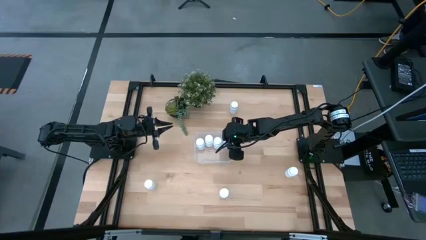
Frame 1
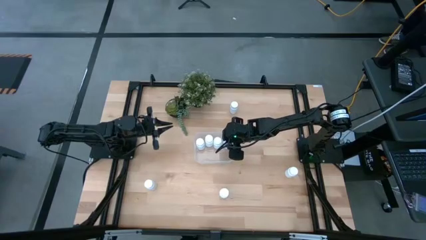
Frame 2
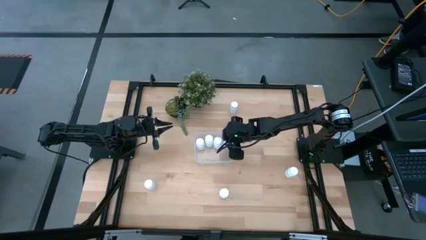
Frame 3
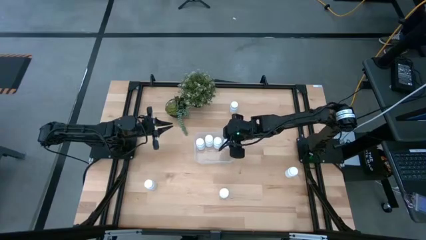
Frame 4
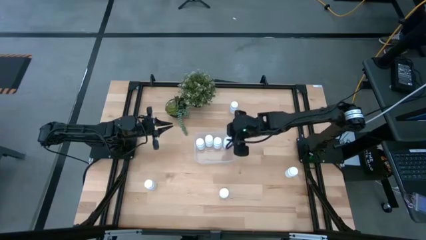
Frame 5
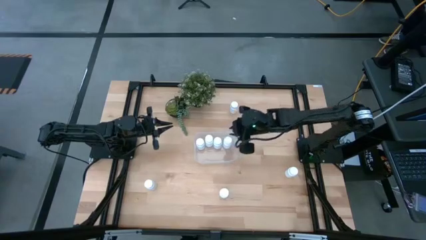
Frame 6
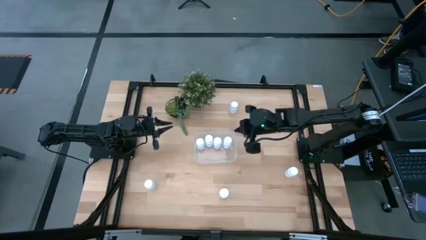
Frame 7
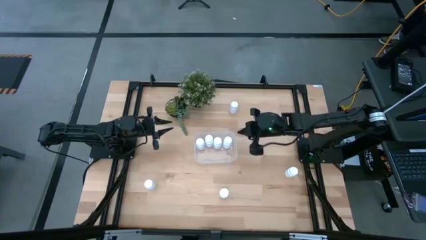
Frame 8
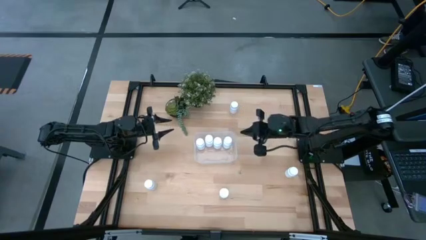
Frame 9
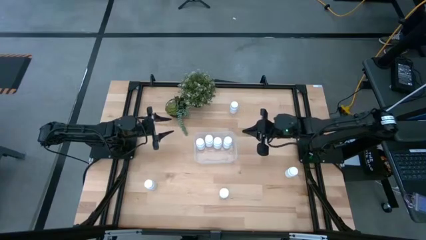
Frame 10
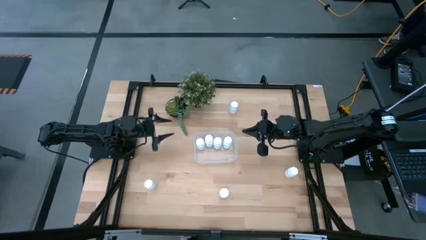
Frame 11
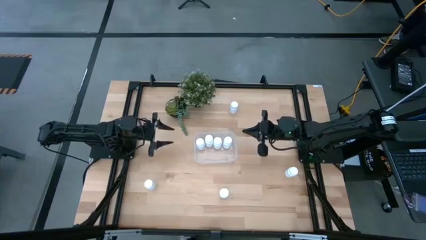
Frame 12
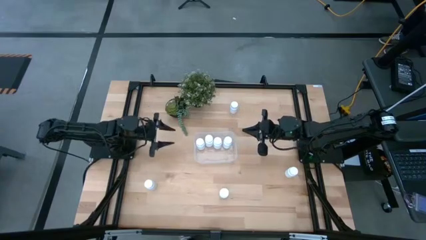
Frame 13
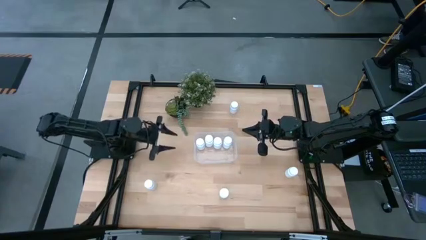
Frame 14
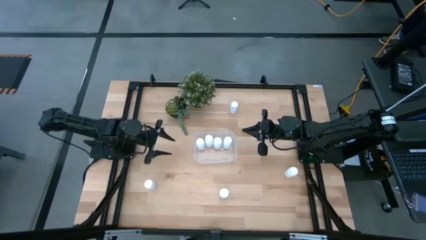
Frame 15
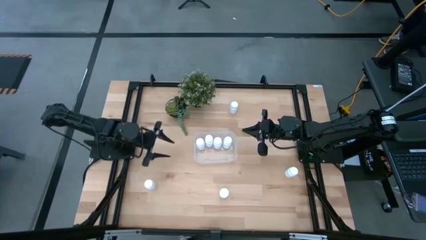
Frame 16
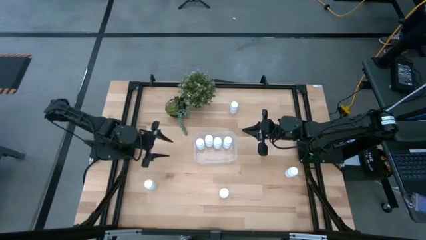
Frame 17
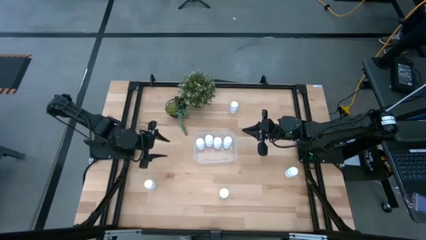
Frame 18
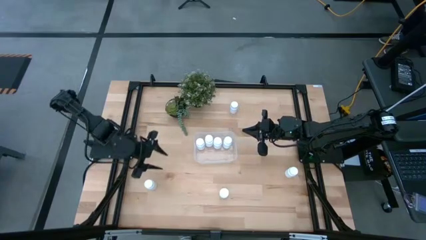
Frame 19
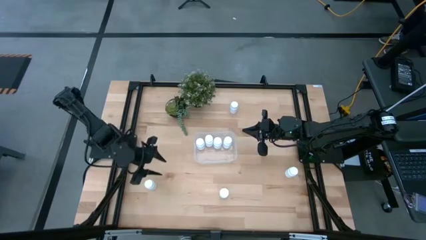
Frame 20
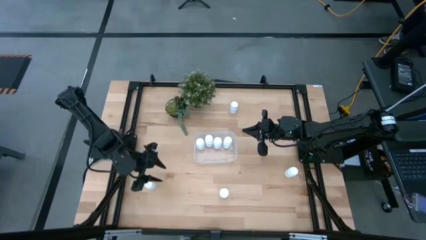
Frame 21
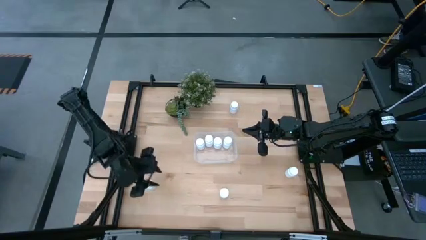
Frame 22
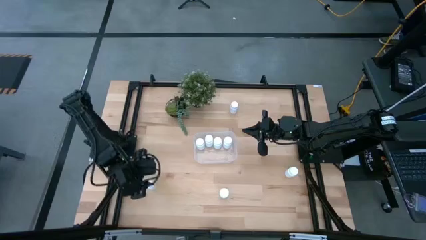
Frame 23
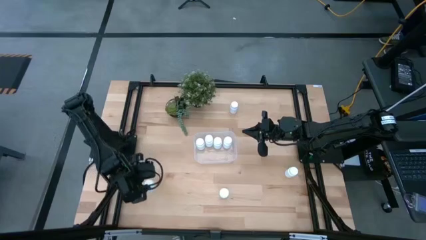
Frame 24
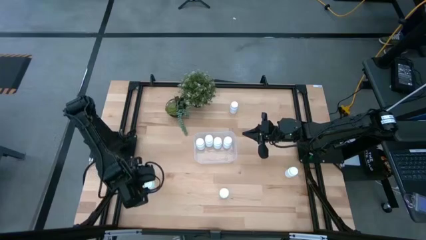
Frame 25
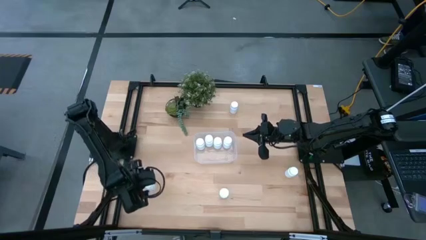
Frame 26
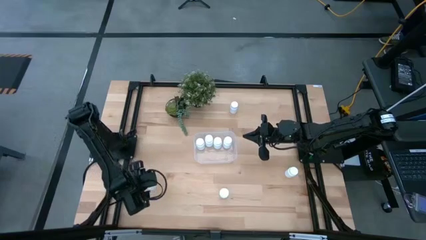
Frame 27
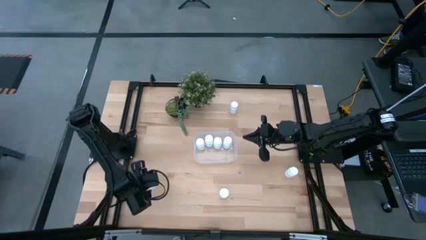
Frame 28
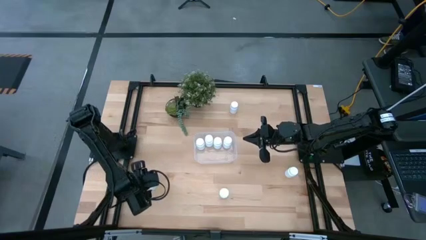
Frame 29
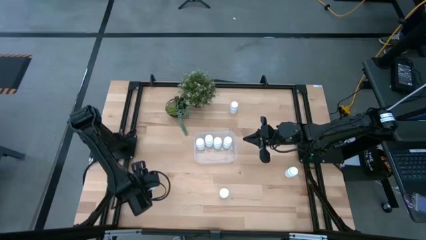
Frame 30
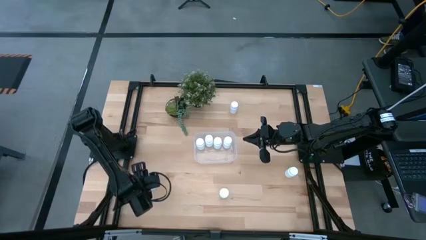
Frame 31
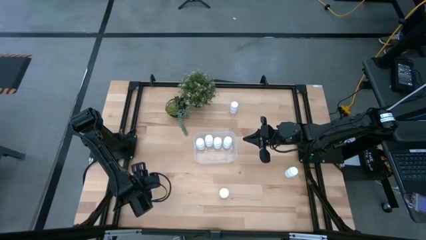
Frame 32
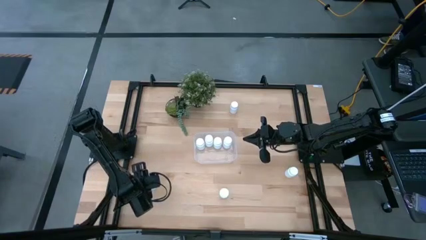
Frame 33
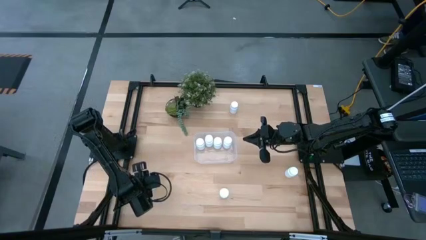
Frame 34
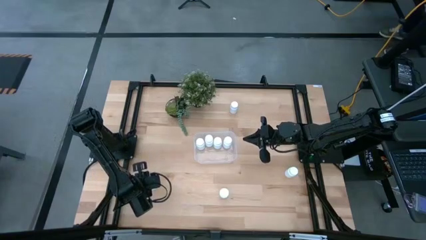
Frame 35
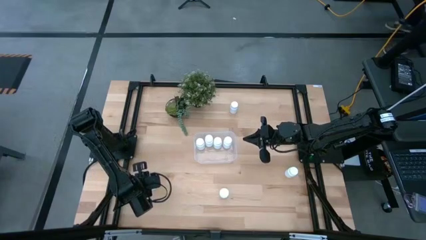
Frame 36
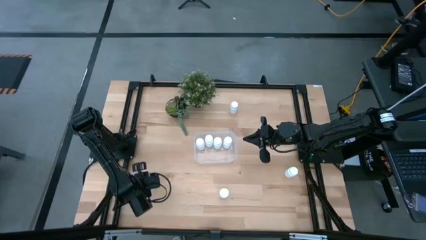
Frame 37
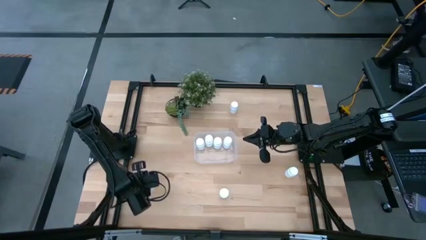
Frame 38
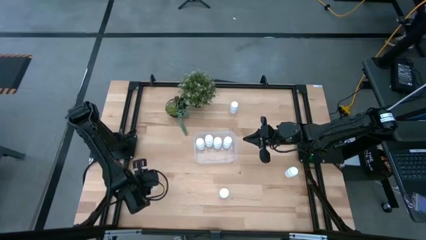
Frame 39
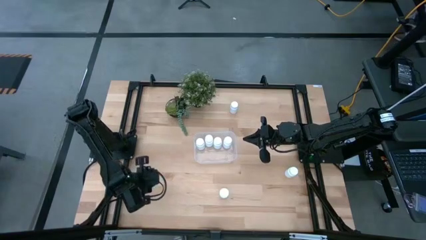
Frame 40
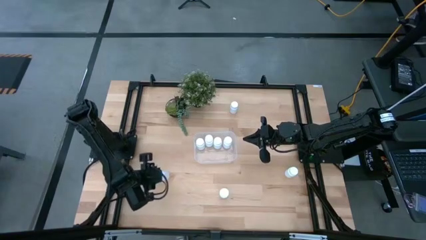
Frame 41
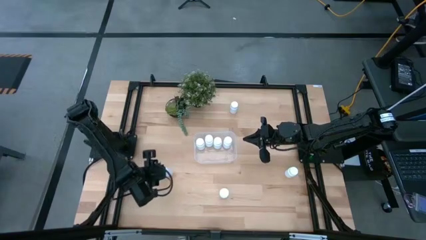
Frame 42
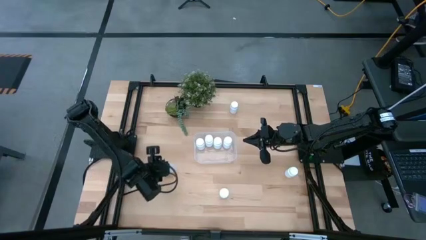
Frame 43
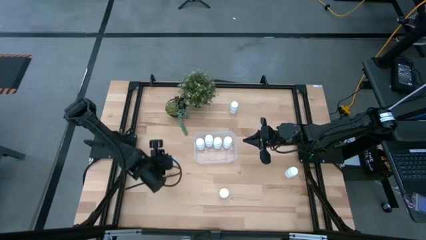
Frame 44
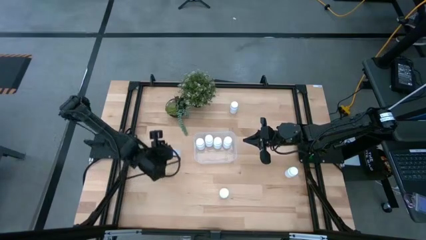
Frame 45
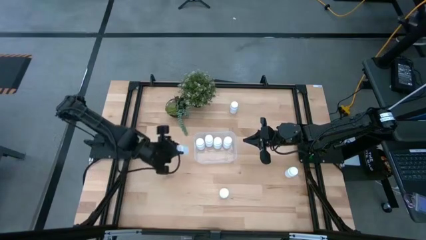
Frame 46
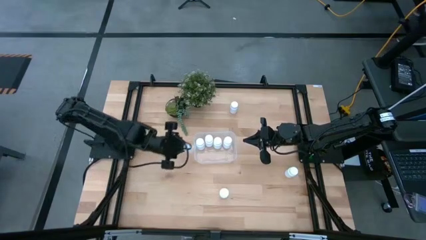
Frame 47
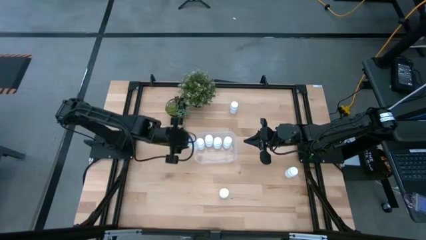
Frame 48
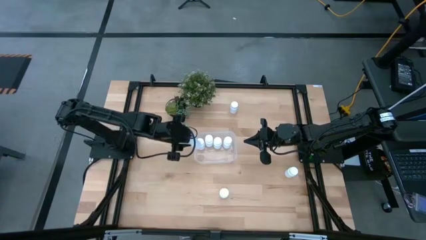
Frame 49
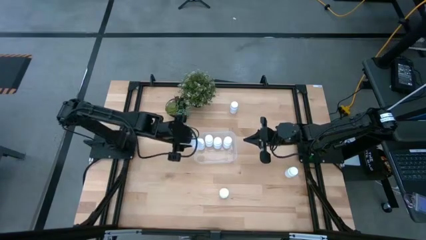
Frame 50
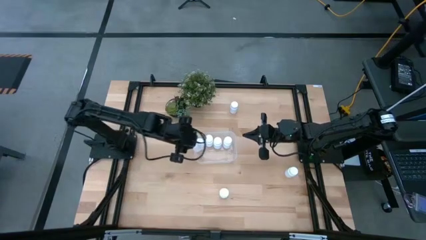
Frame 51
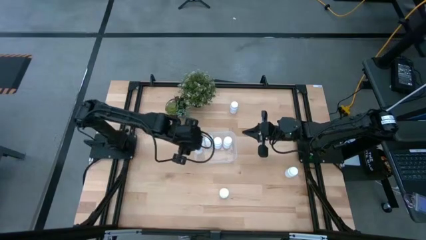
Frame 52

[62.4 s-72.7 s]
Task: Pick and place pill bottles into a basket
Put the pill bottle into the bin

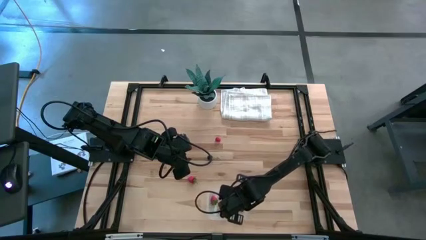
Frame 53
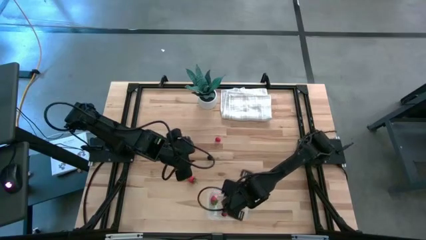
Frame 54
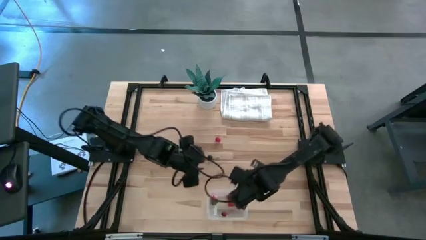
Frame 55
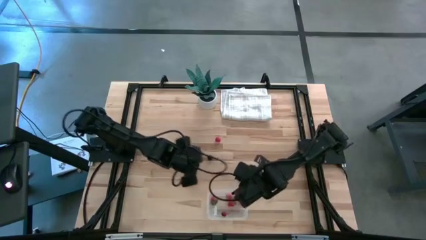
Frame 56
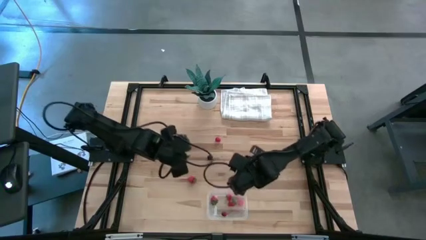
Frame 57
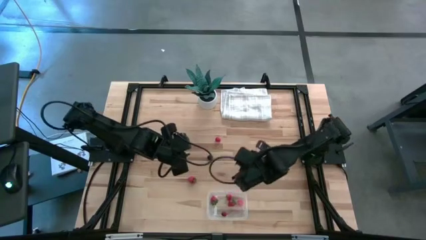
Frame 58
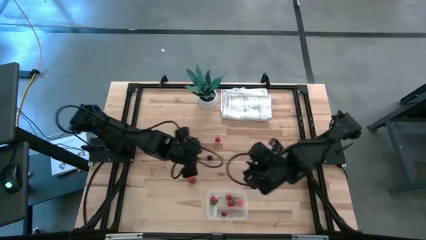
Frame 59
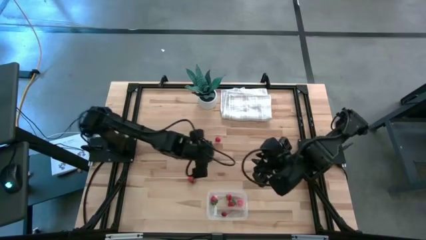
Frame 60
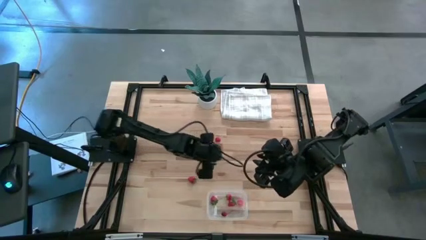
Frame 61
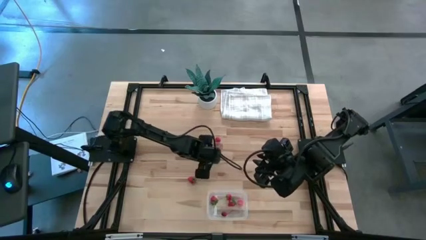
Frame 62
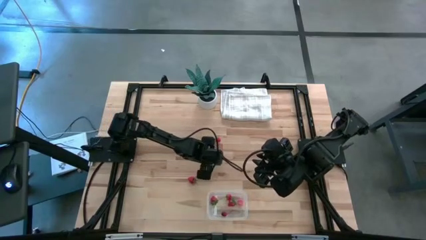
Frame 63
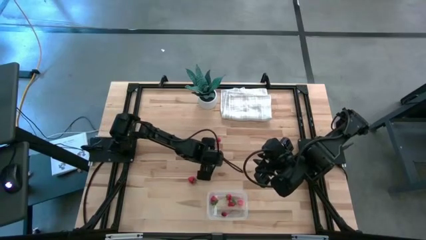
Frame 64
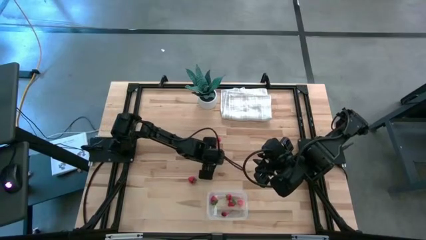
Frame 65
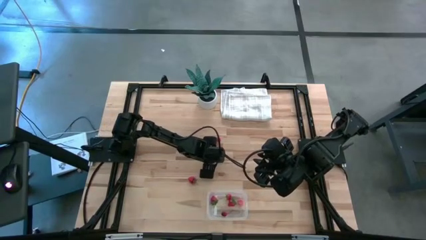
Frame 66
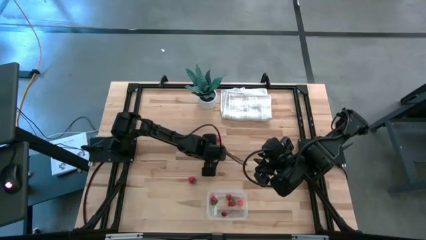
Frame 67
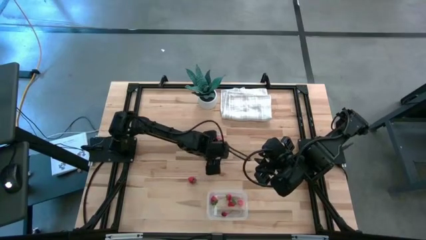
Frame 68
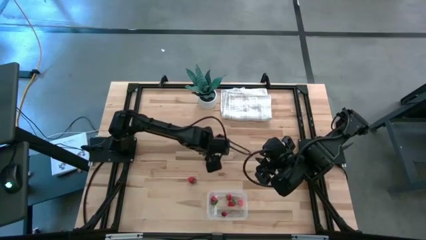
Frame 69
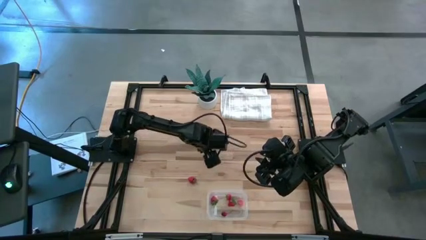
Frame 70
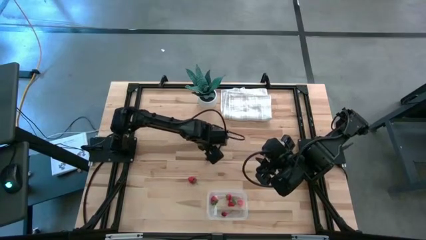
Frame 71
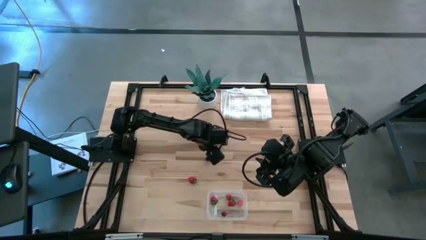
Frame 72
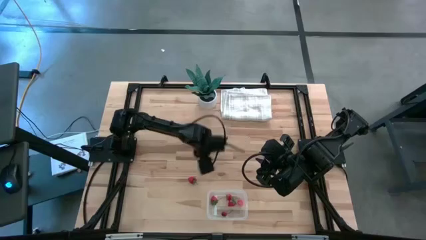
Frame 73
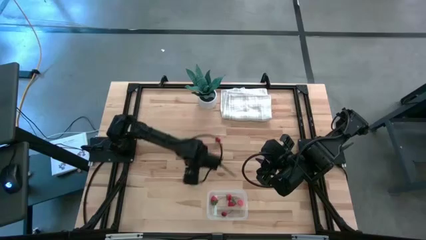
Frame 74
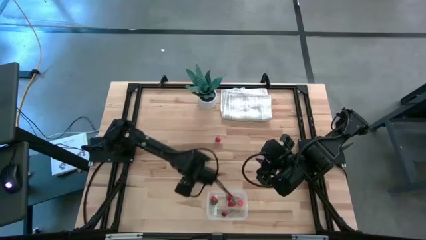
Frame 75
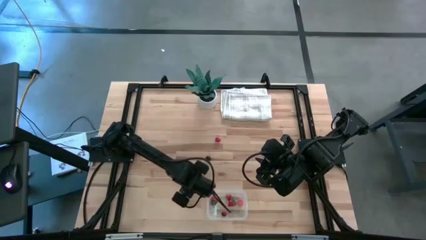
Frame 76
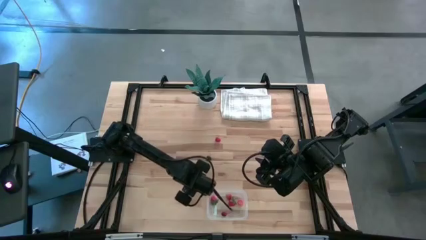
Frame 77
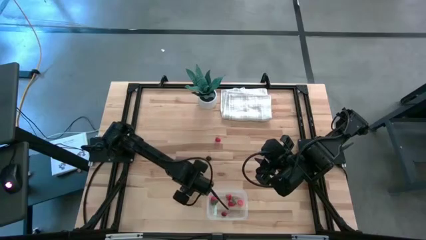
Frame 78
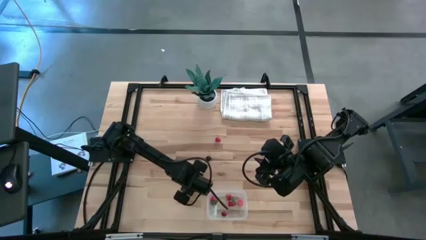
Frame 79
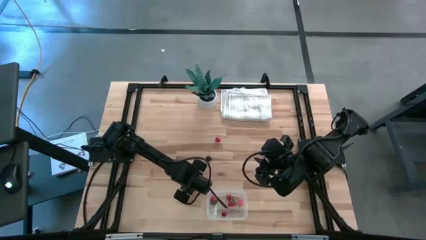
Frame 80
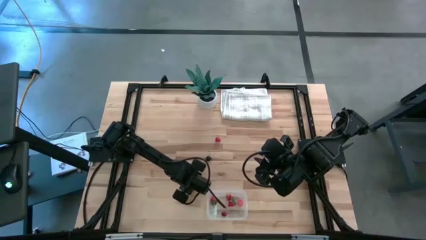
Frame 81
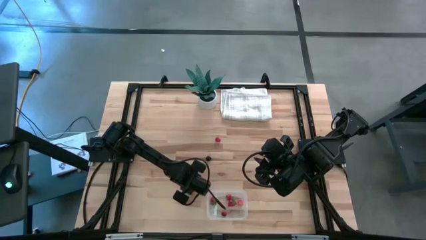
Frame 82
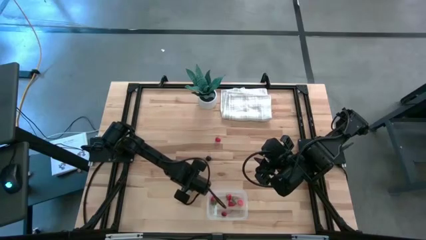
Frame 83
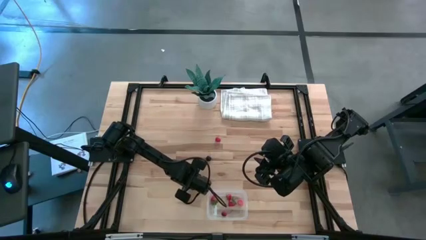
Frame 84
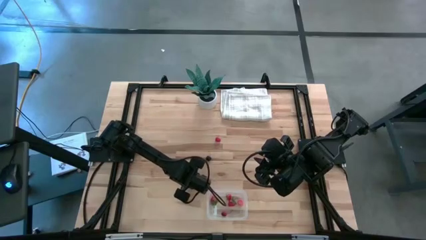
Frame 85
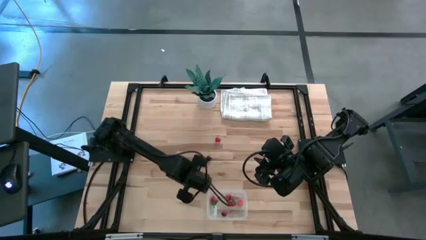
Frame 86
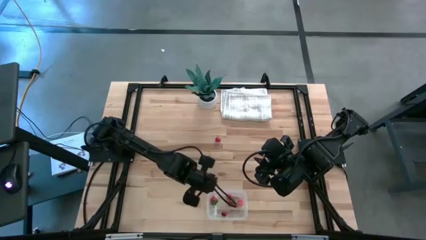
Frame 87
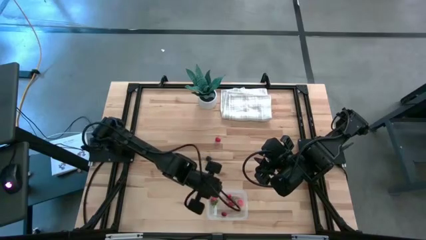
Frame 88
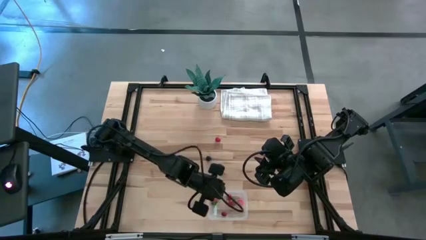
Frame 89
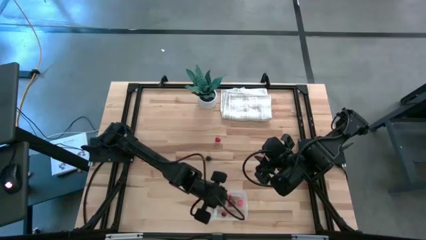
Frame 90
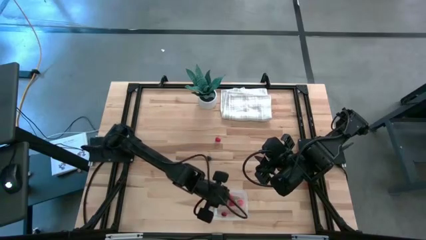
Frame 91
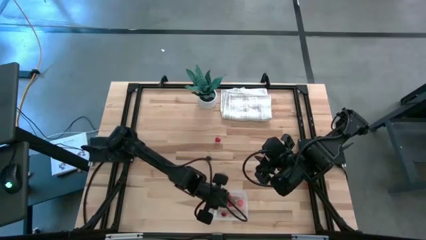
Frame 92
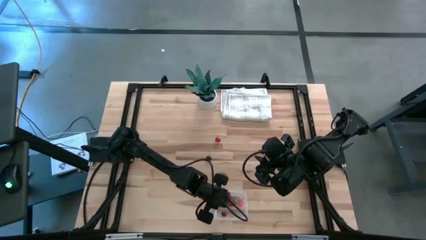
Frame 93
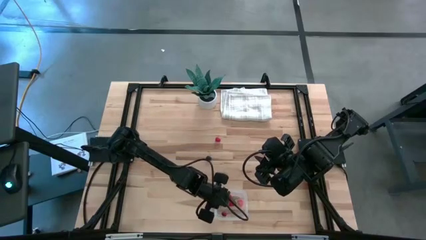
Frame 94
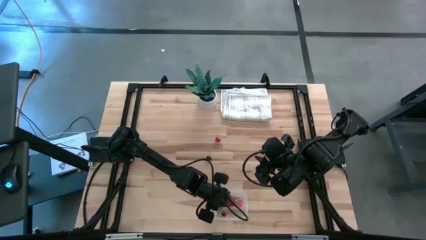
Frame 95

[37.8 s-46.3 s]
Task: Pick and placing Produce into tupperware
Put the strawberry into the transparent bin
